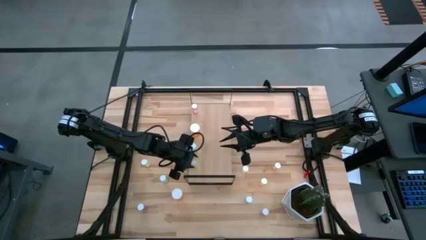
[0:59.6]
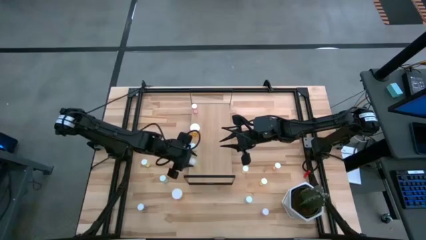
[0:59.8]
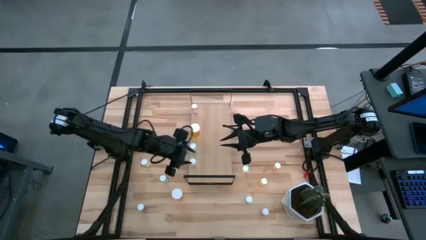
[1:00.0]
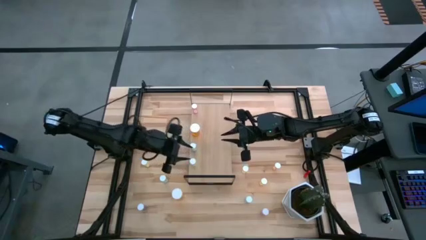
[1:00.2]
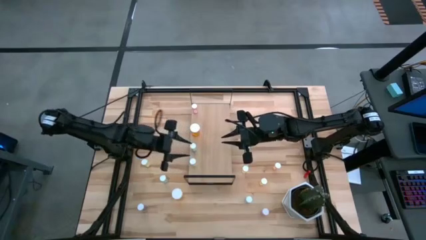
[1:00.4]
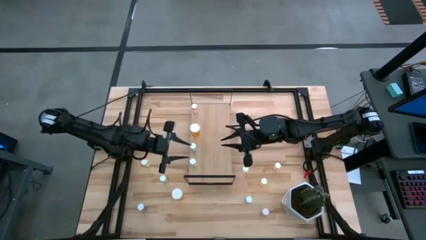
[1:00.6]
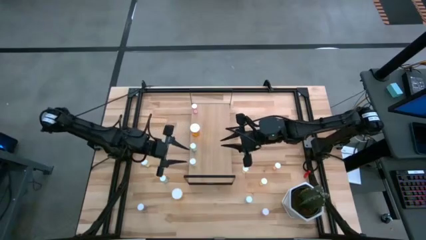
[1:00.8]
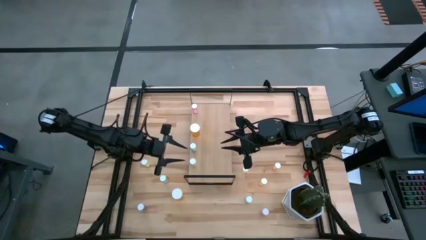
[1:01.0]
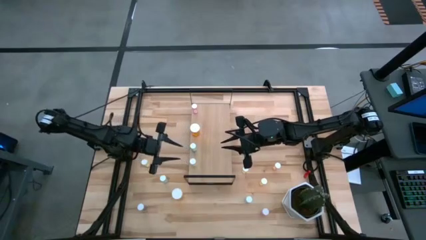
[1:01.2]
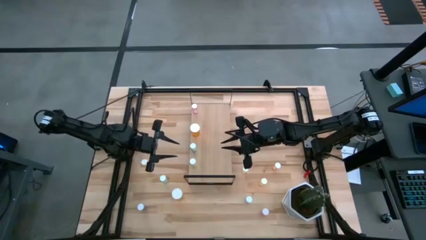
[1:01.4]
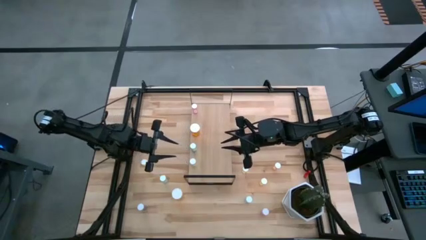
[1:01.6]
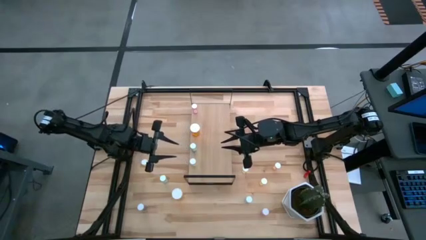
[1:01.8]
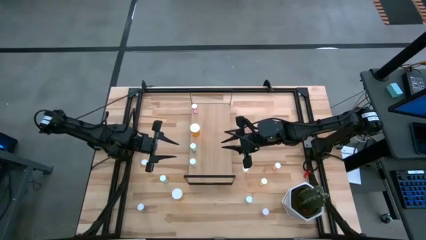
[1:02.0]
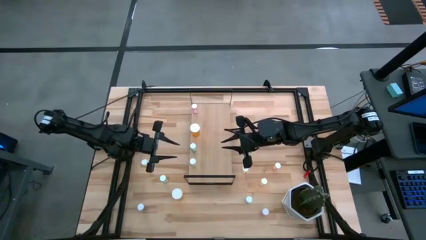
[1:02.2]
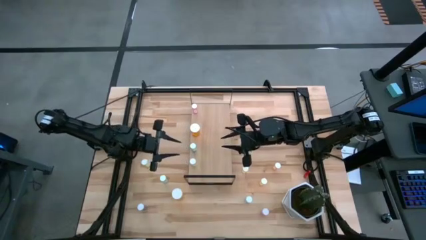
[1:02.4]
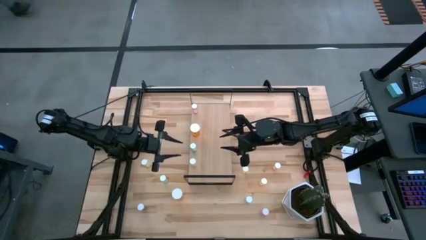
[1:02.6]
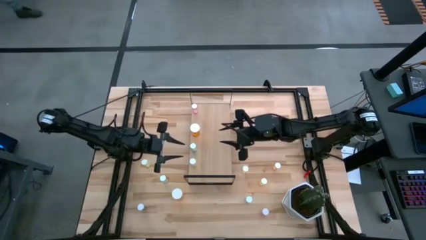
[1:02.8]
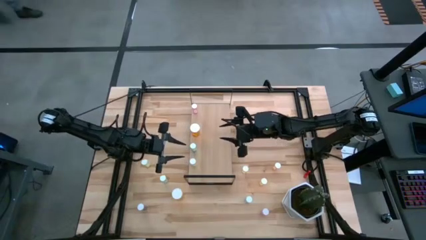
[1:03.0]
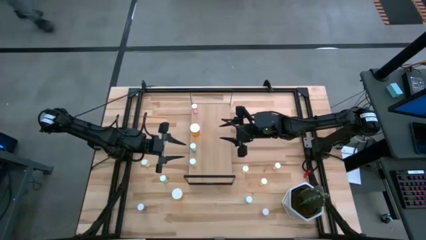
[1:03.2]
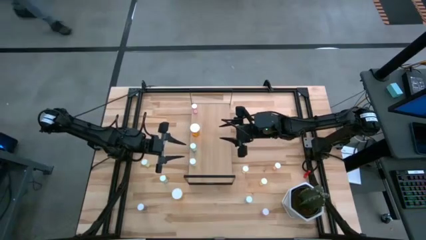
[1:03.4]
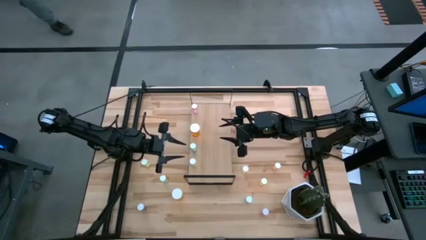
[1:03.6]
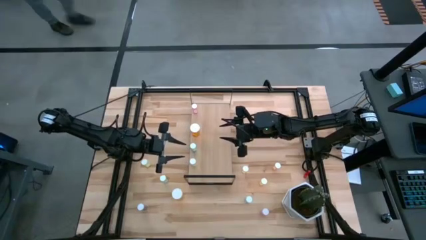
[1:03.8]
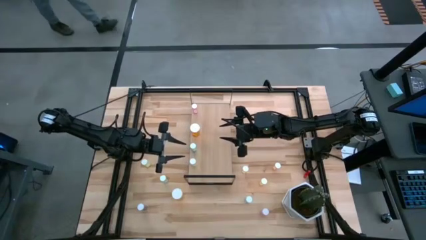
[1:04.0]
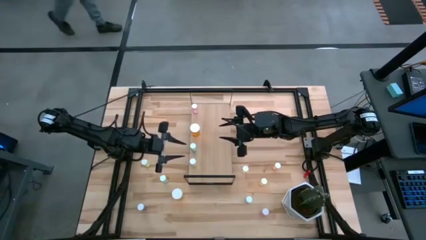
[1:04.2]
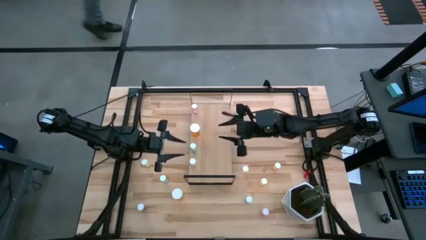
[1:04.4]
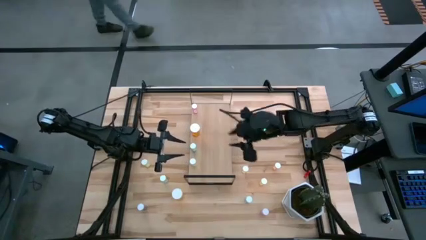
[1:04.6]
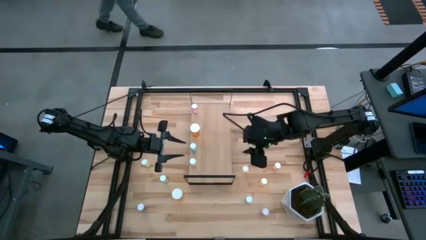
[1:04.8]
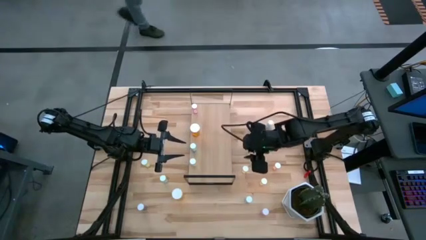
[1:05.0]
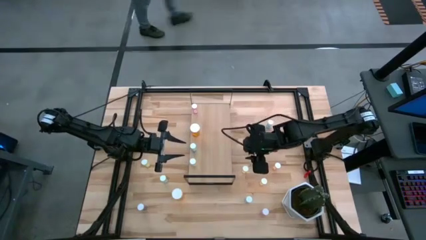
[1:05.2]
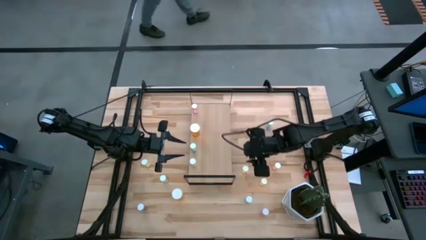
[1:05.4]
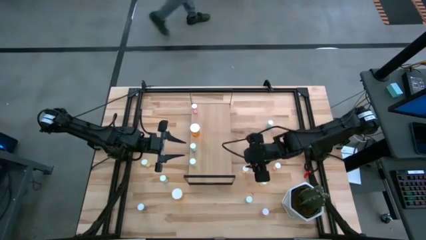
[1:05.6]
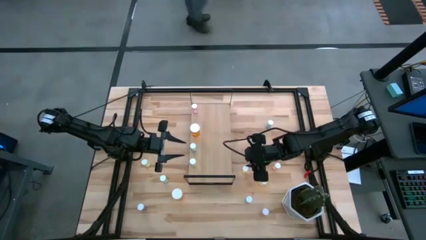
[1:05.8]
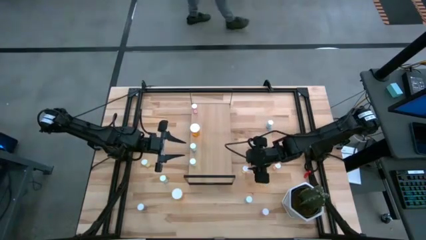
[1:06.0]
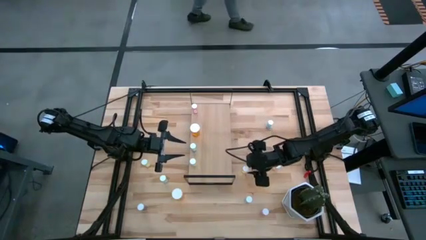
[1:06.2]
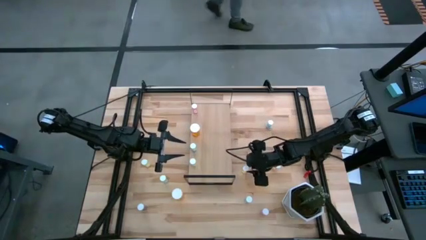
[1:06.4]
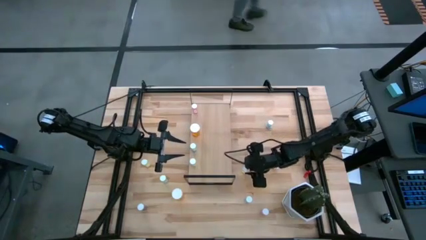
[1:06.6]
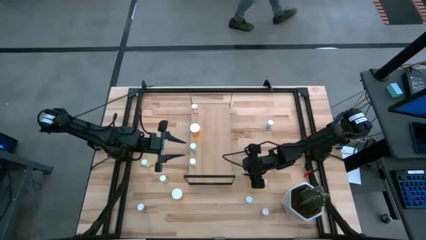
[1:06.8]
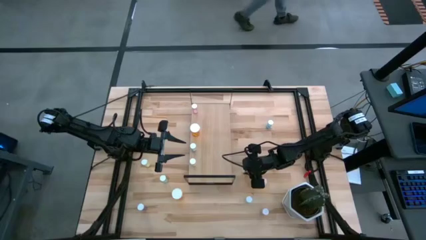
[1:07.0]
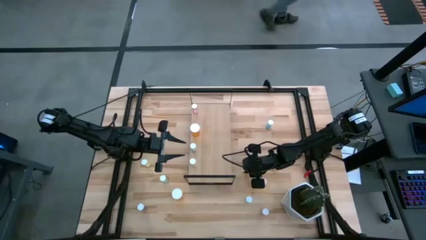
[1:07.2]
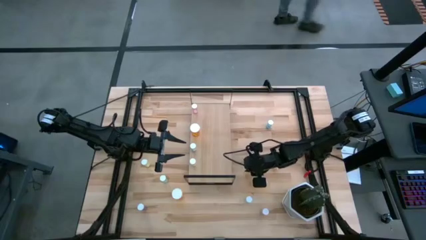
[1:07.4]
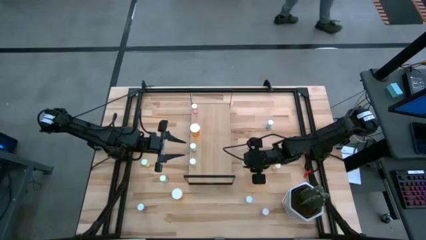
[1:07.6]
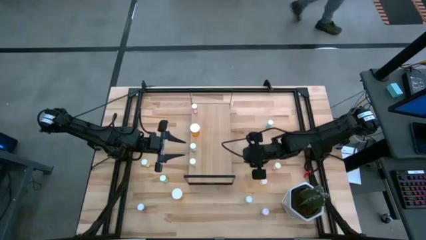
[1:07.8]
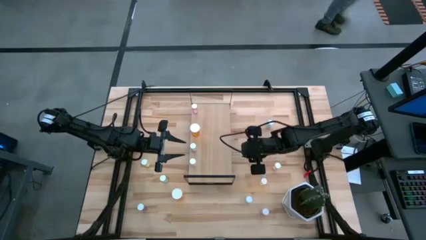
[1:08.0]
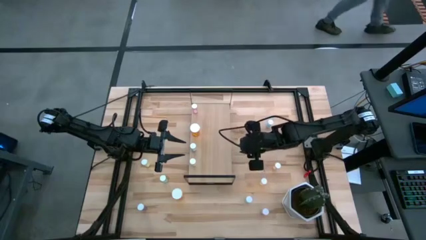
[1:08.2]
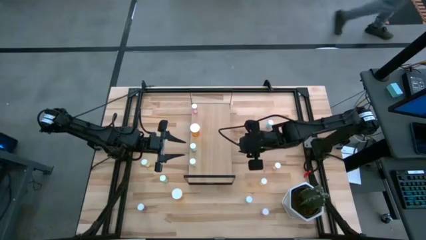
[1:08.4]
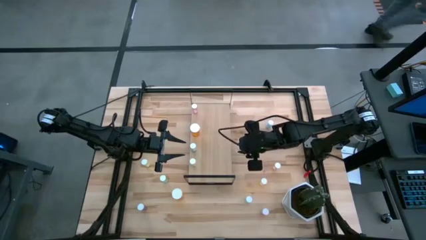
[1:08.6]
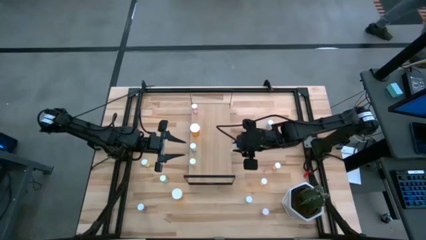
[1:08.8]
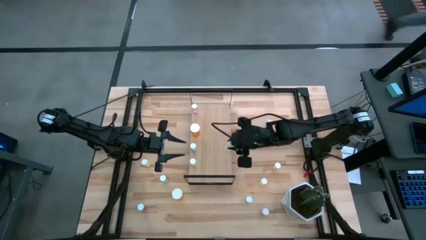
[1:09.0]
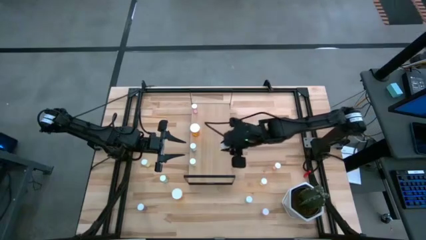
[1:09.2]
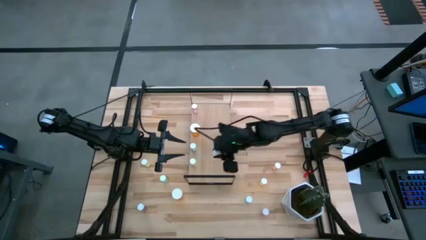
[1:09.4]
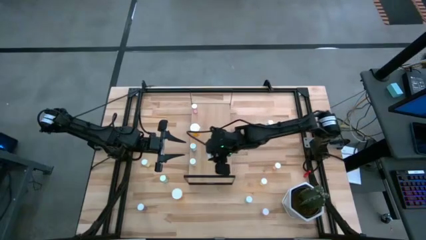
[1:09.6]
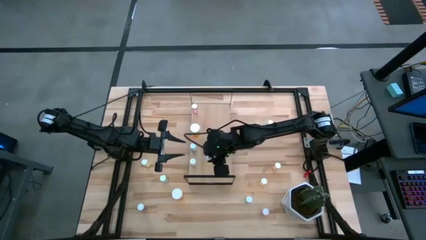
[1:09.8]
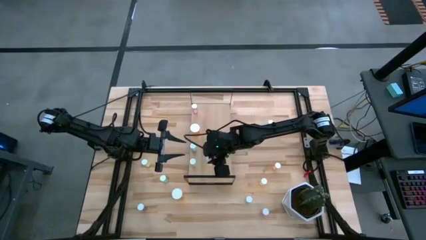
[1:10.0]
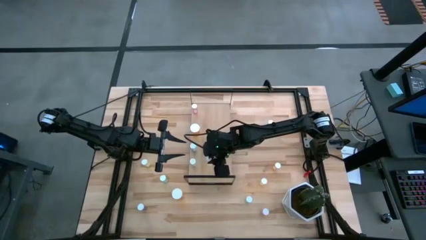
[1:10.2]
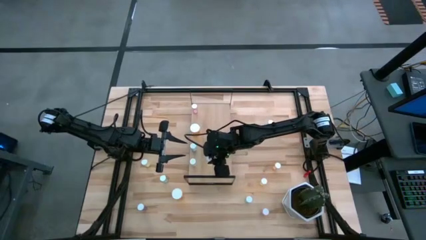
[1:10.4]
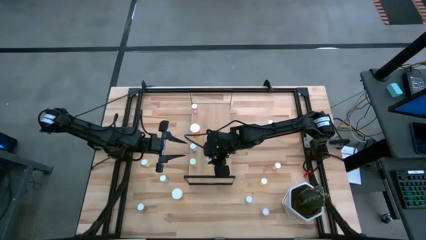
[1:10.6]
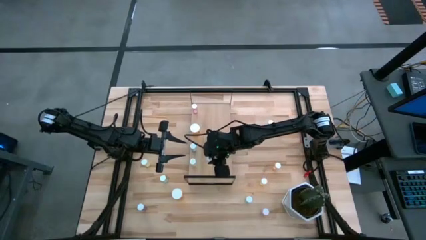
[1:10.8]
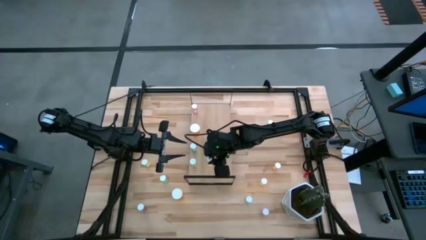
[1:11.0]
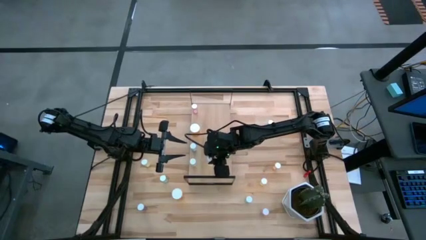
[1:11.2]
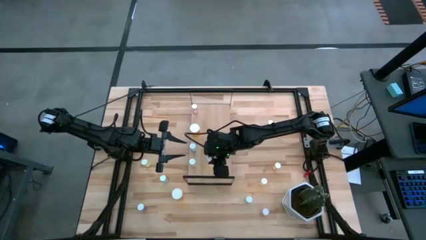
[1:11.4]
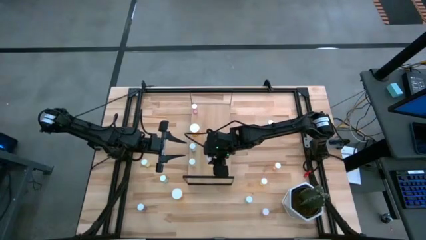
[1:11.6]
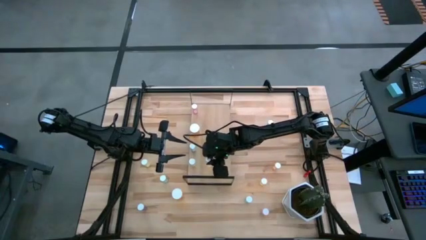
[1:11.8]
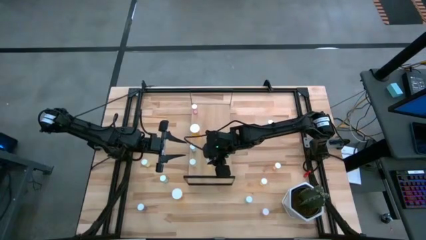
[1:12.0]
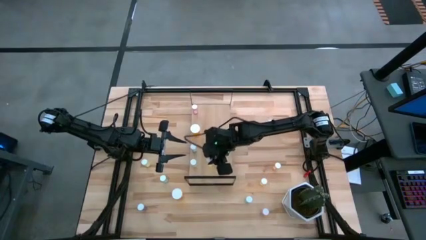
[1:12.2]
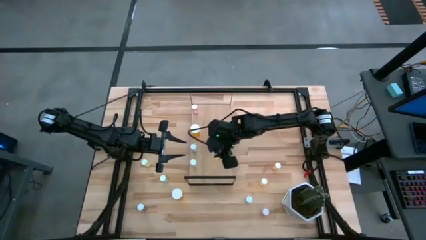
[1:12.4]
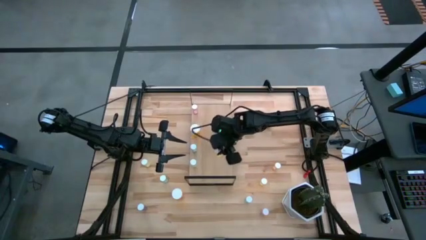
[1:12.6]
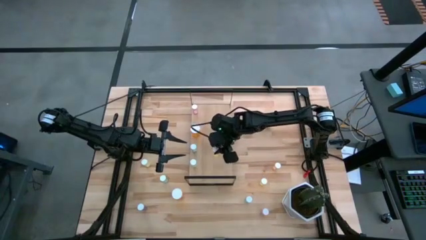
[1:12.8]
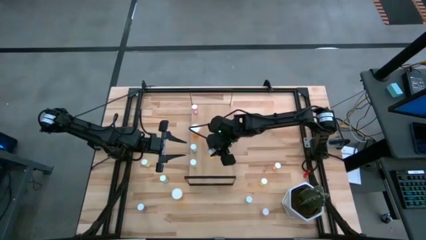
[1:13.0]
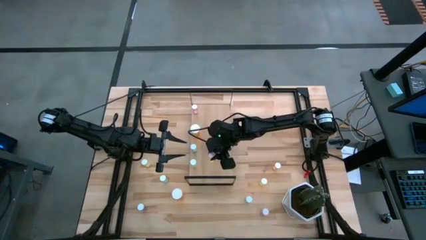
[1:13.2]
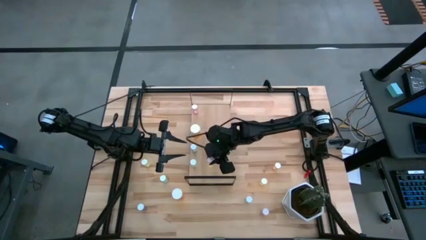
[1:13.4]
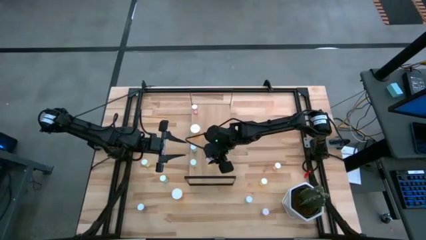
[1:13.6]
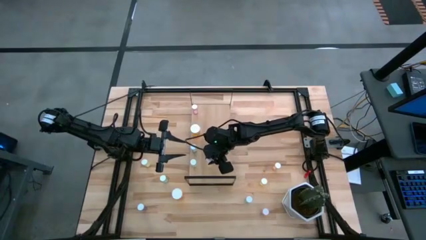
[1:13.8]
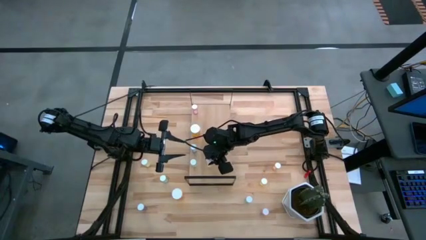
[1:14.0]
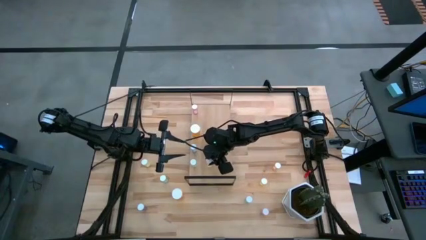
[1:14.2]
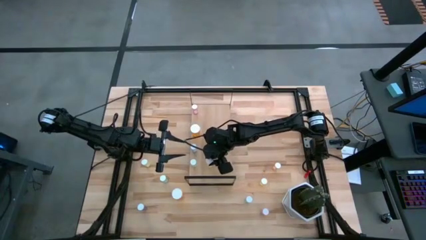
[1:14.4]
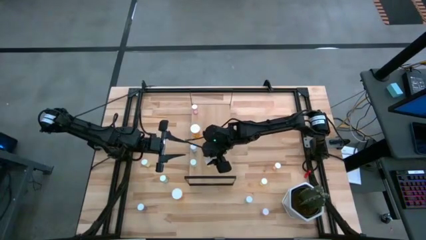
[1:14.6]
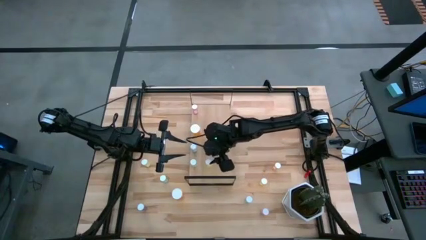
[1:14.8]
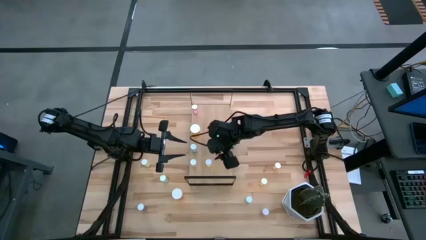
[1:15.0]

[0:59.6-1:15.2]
Task: Pick and place medicine bottles onto shelf by color
Put the yellow pill bottle on the shelf

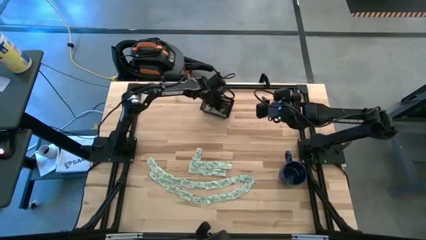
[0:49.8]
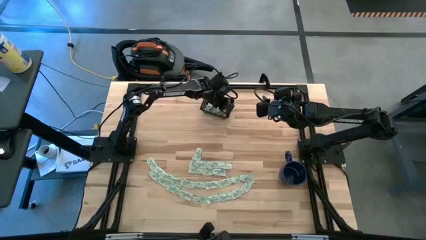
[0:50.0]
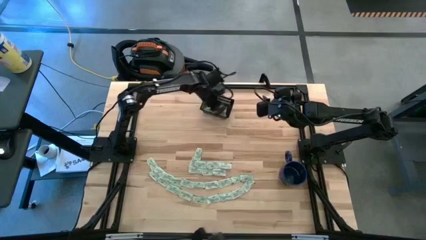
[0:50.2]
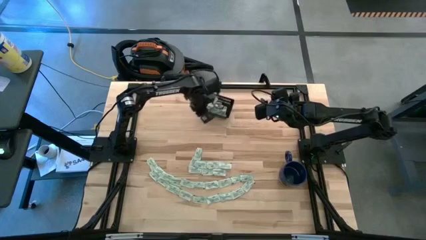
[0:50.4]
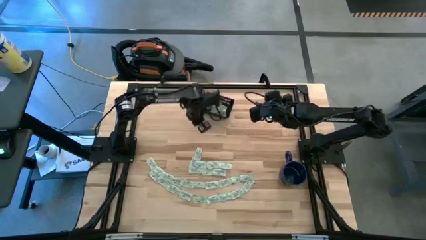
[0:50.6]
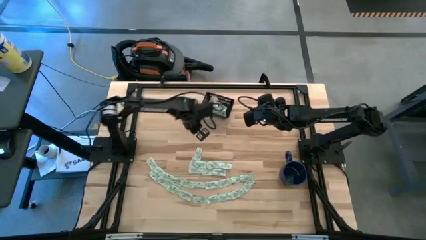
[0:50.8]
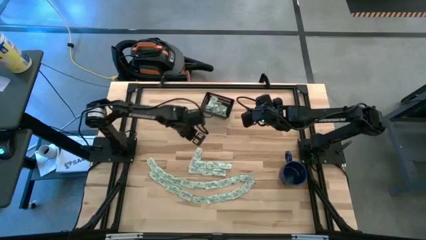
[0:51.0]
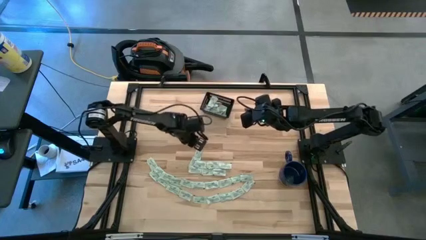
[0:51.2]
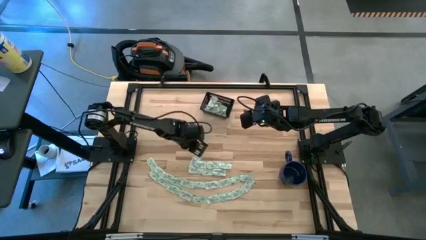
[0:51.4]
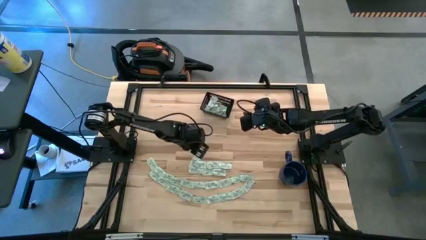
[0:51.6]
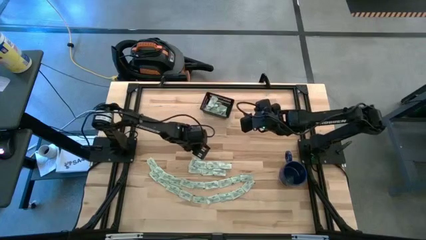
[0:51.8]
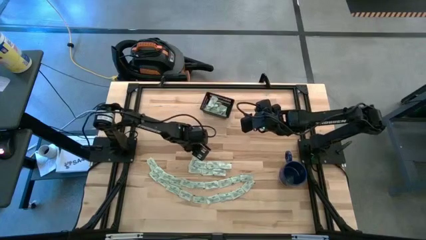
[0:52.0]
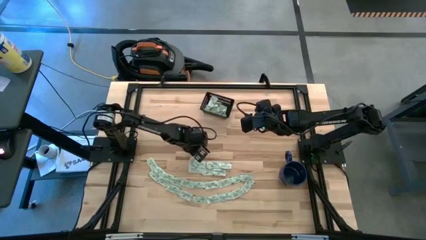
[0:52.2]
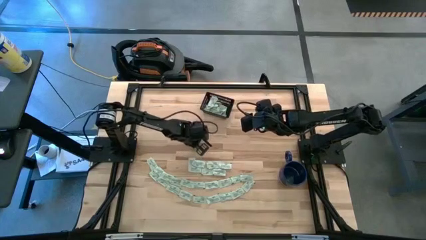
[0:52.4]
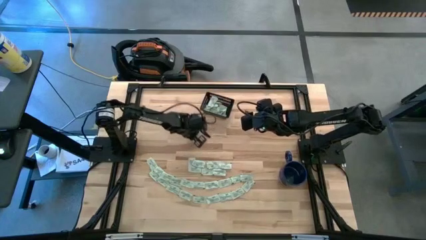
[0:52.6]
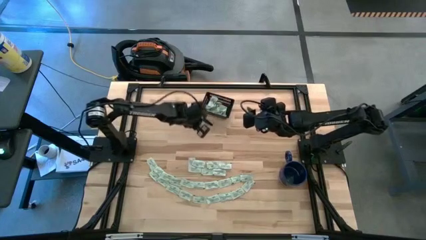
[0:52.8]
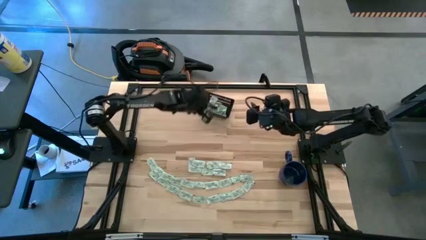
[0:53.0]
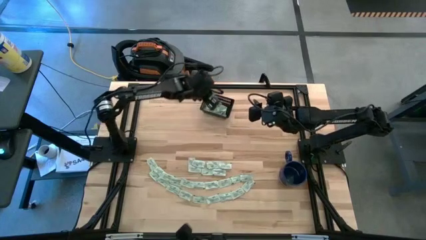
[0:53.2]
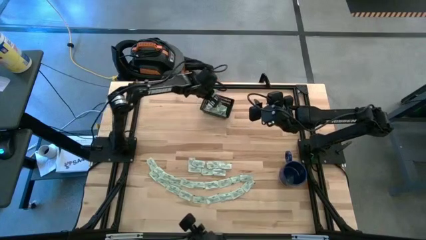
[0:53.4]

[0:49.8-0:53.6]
Task: Pick and place Stevia / Truvia into bins
Put the stevia packet into the black bin
